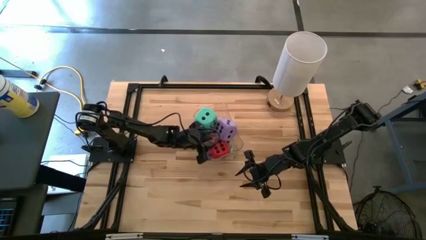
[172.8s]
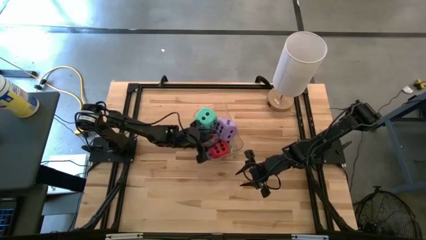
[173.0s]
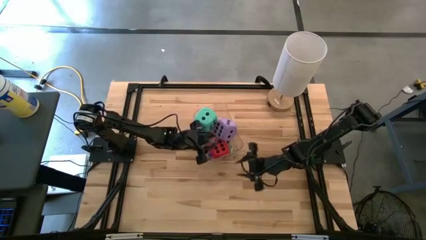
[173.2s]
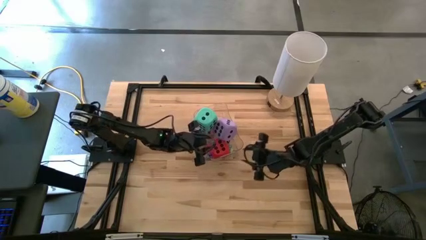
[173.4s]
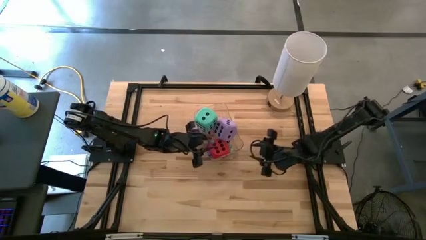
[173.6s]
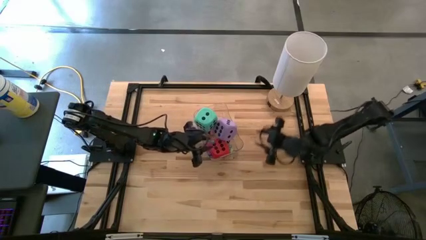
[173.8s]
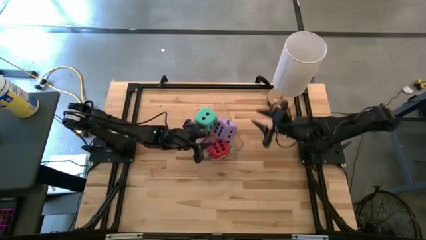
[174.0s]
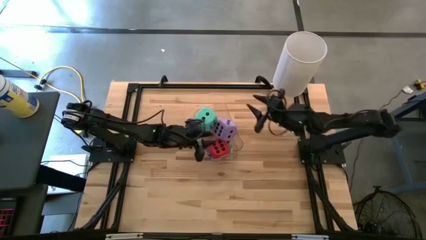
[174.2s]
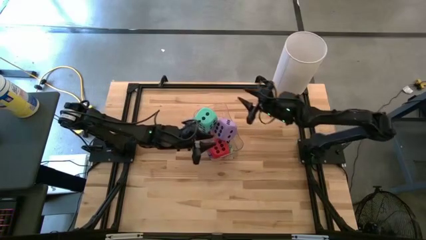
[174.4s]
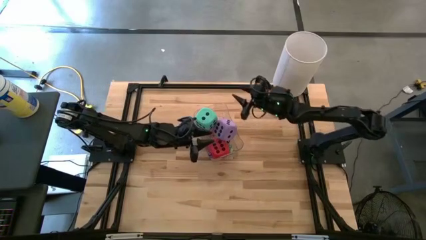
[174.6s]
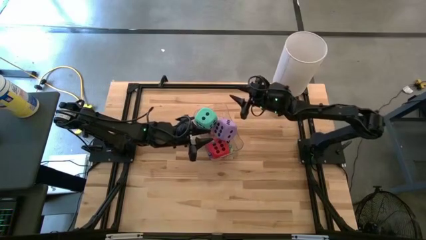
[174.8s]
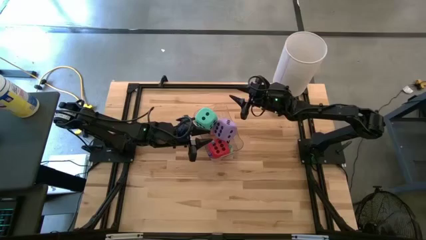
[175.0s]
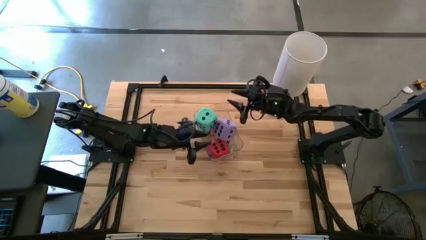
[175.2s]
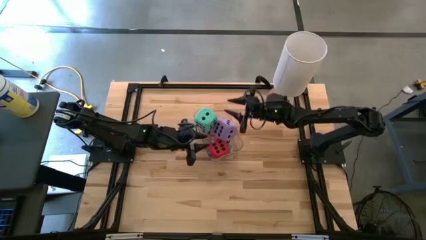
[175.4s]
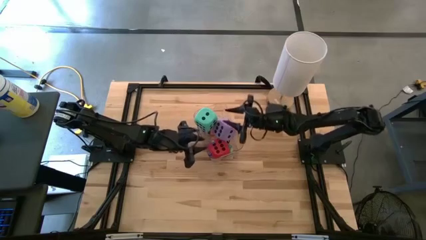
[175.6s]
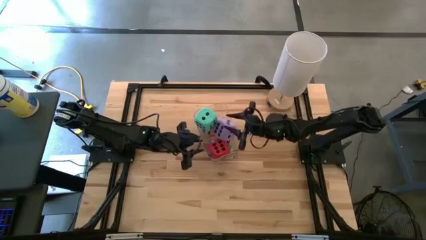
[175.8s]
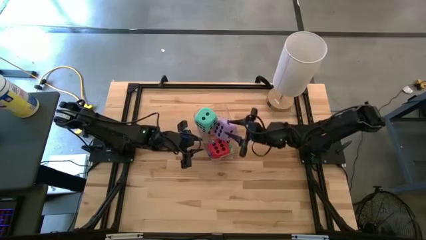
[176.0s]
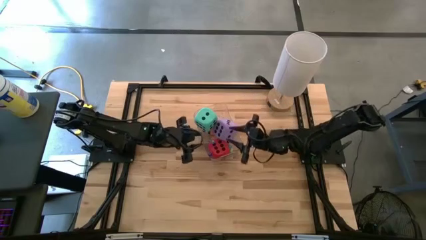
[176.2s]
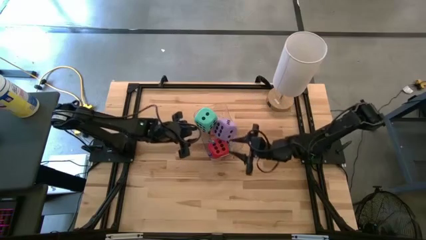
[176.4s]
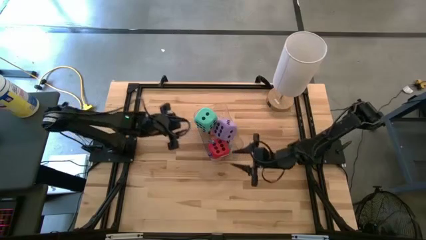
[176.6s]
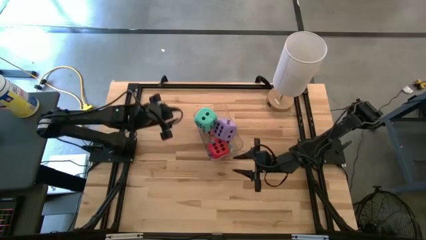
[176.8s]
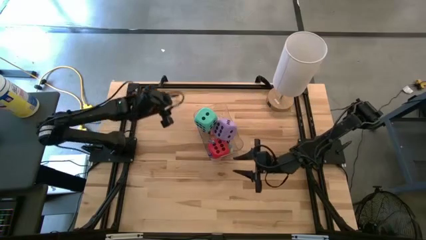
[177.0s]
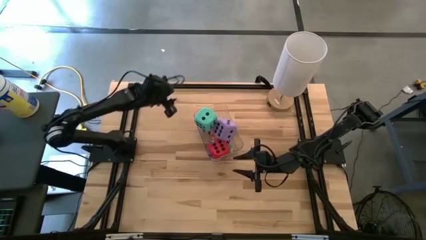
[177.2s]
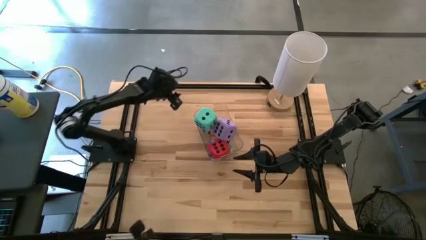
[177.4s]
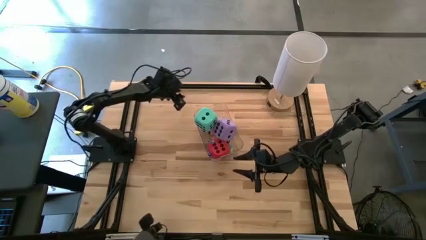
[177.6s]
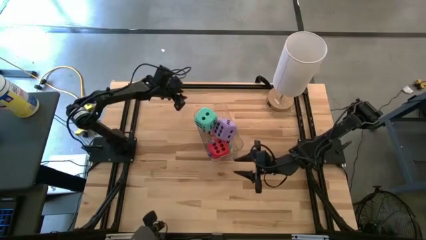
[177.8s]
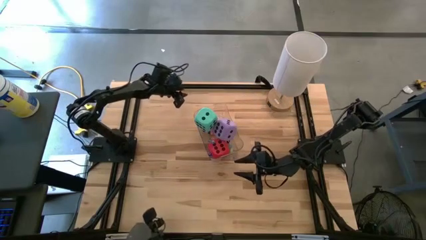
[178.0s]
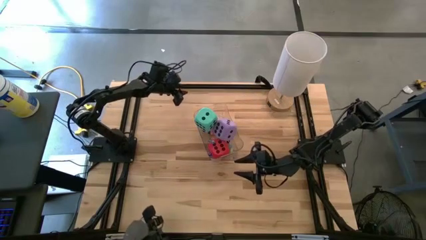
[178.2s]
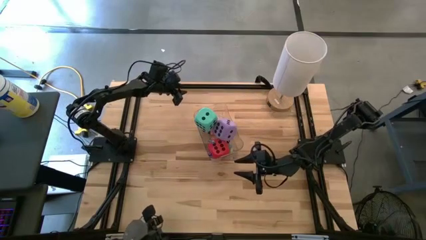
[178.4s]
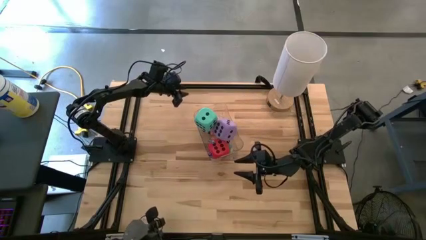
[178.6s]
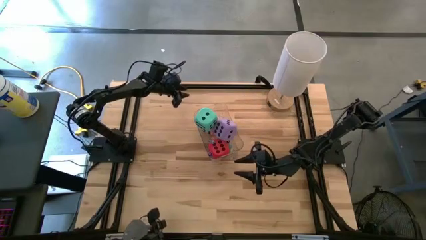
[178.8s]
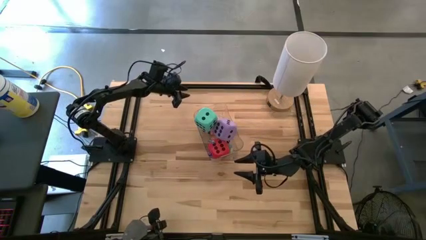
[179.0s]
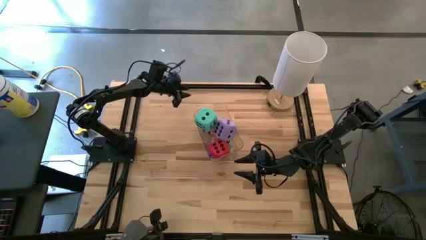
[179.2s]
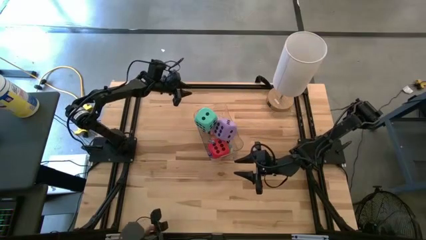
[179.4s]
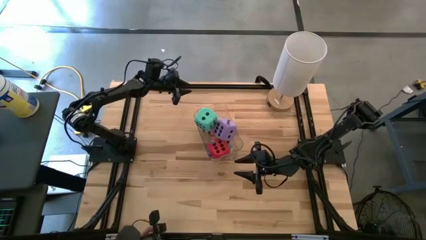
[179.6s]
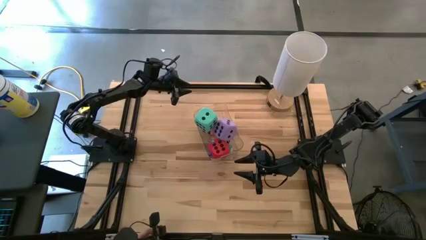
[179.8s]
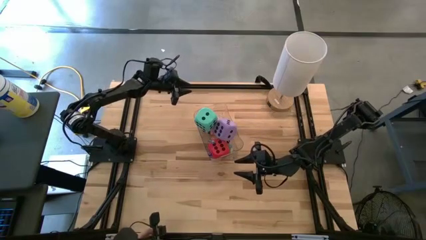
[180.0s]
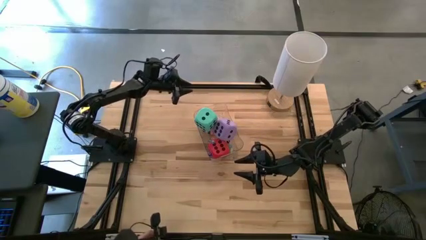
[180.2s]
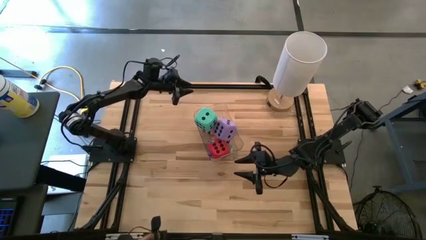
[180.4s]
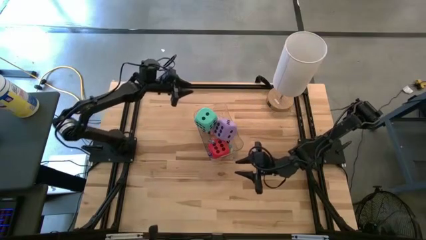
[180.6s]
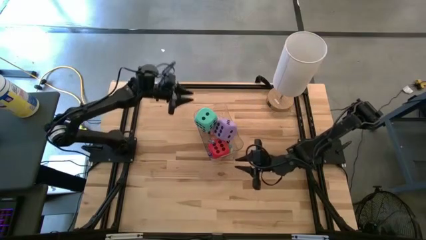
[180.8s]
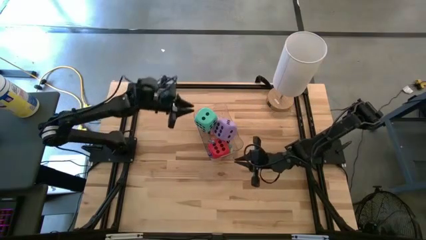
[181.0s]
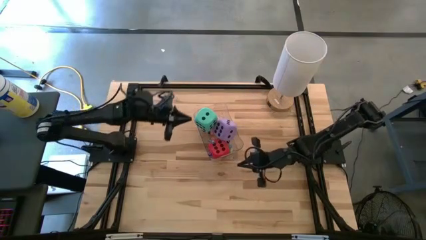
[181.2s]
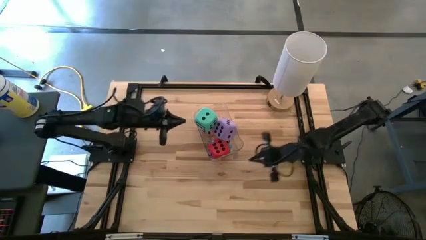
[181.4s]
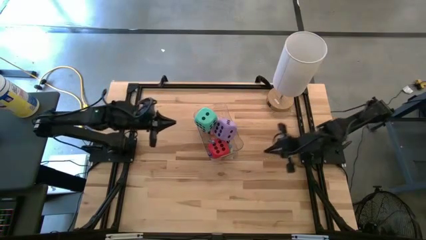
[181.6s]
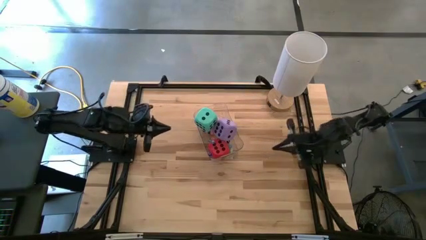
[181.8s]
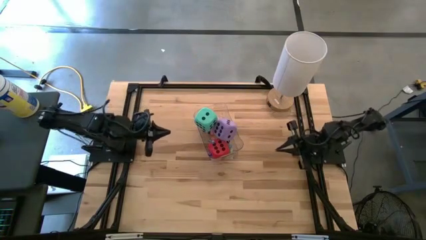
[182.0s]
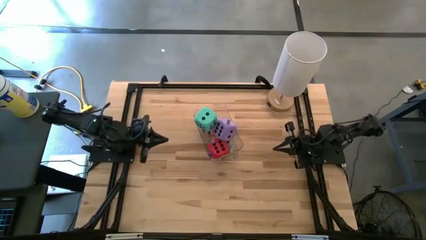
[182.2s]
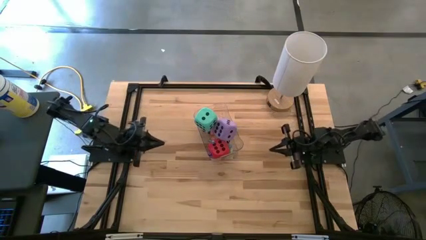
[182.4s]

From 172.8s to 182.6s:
Task: Pick & Place Dice
Return to Home Position

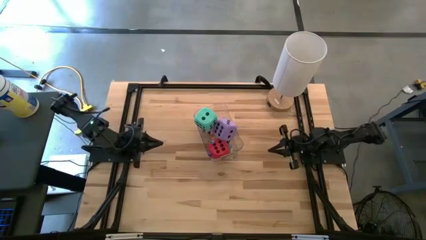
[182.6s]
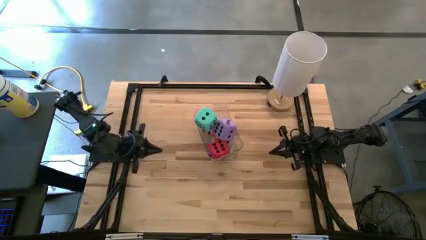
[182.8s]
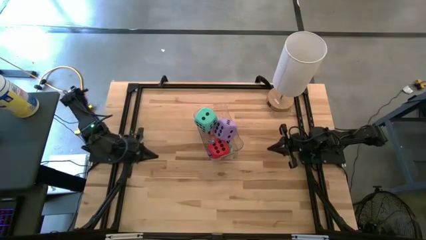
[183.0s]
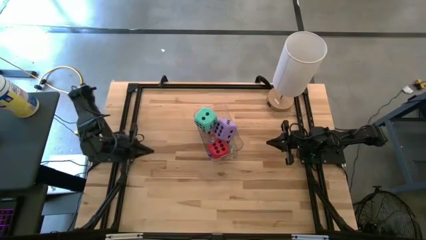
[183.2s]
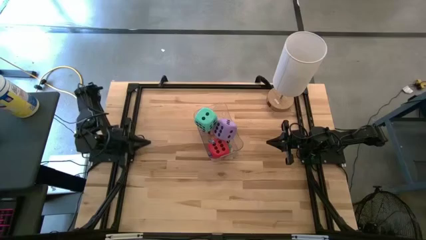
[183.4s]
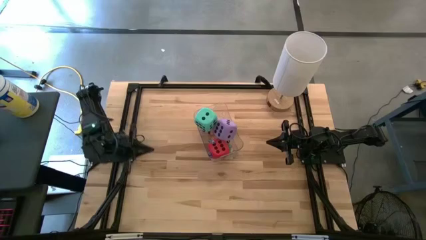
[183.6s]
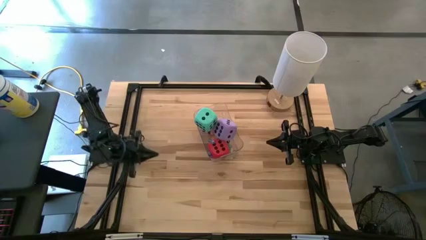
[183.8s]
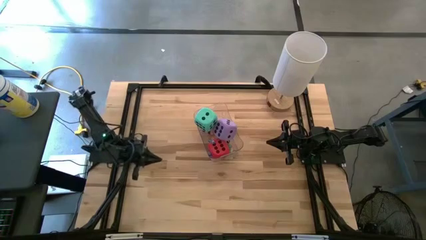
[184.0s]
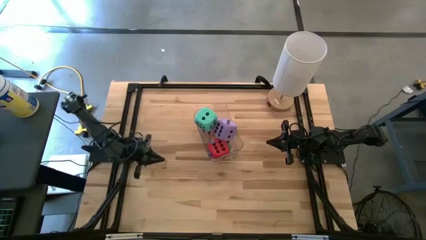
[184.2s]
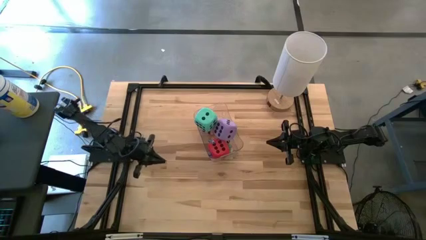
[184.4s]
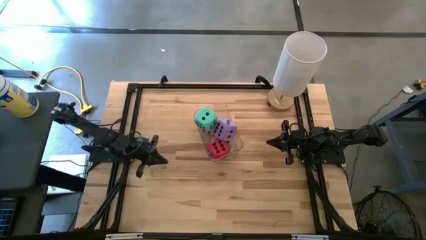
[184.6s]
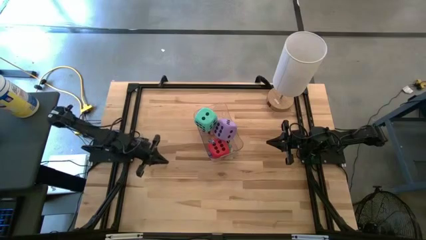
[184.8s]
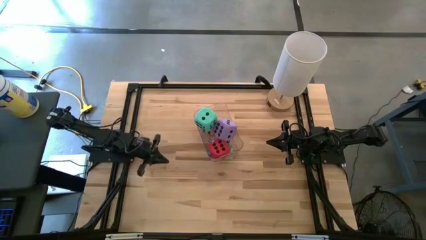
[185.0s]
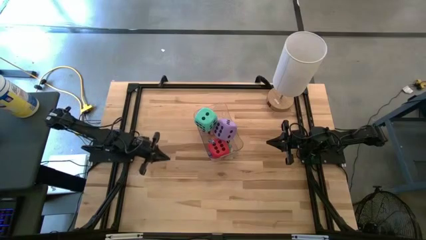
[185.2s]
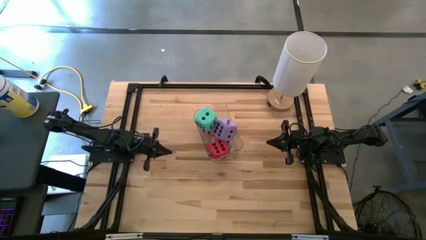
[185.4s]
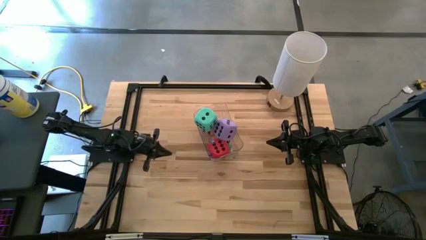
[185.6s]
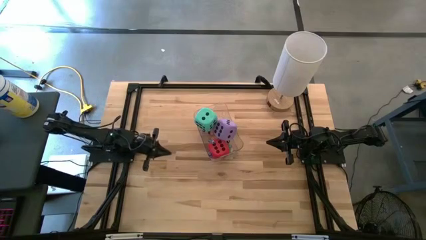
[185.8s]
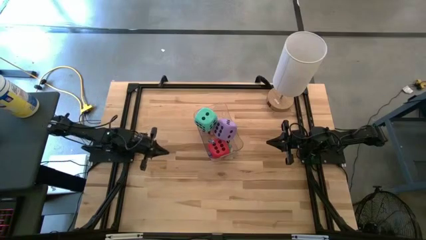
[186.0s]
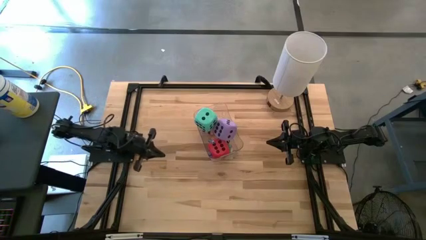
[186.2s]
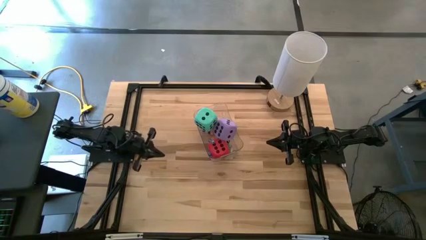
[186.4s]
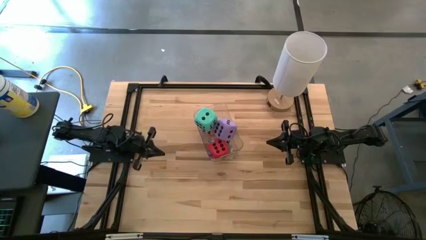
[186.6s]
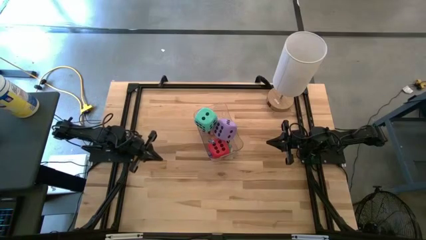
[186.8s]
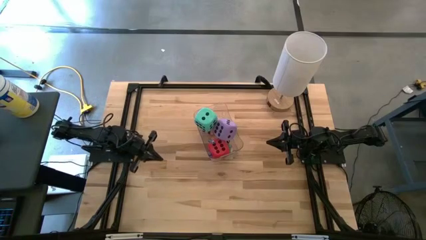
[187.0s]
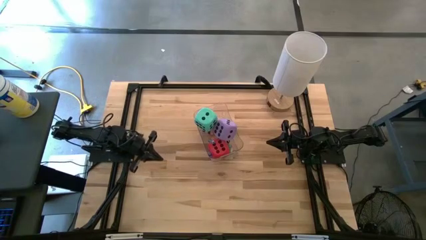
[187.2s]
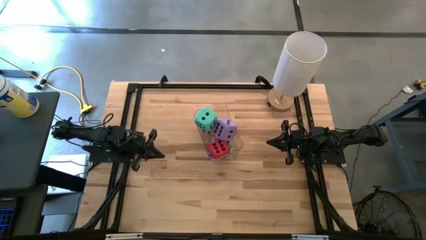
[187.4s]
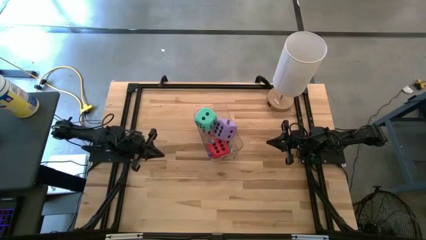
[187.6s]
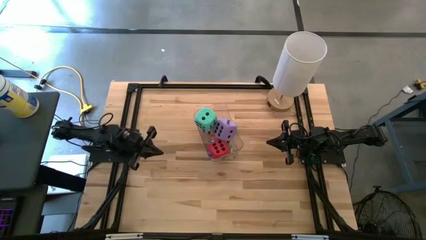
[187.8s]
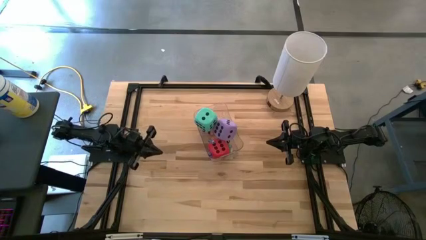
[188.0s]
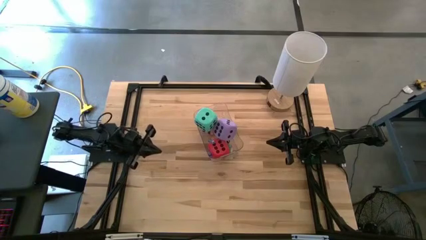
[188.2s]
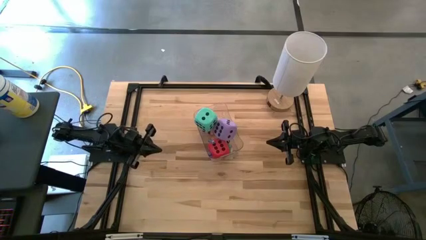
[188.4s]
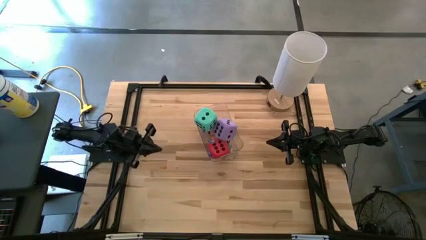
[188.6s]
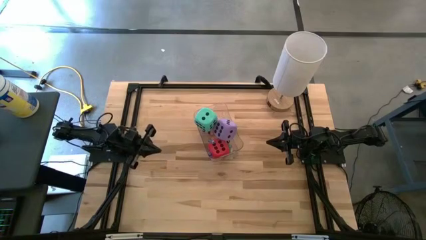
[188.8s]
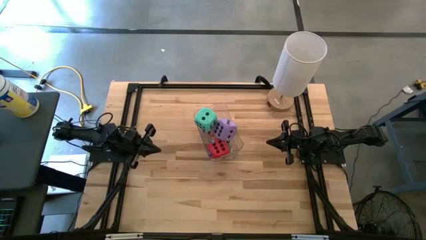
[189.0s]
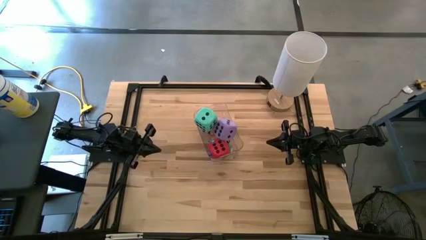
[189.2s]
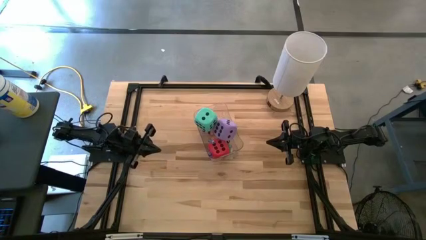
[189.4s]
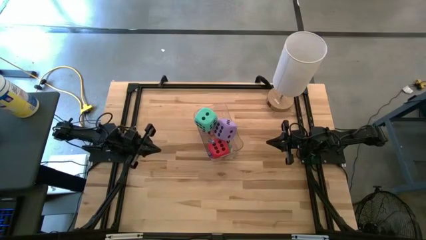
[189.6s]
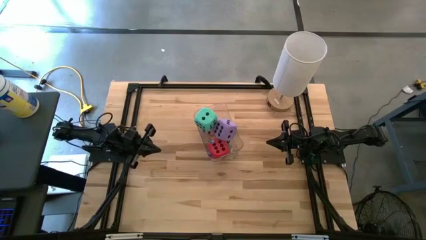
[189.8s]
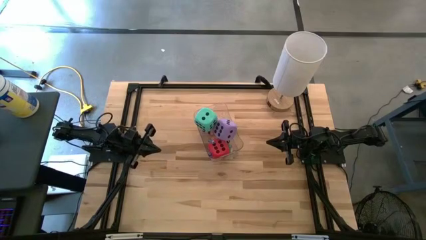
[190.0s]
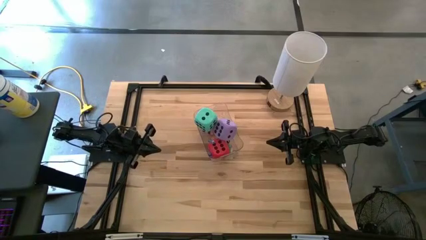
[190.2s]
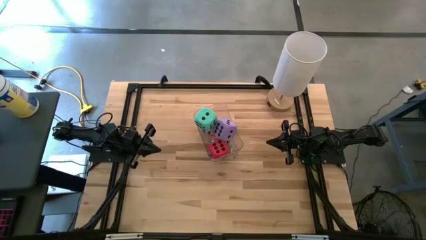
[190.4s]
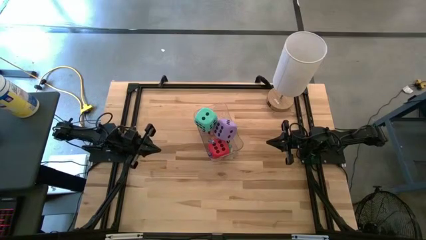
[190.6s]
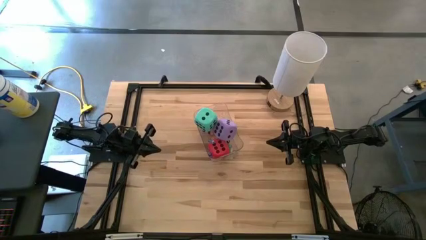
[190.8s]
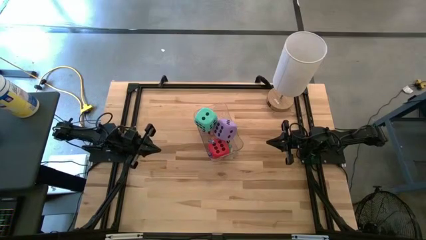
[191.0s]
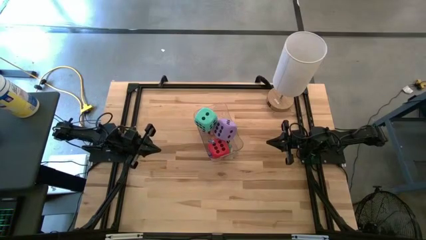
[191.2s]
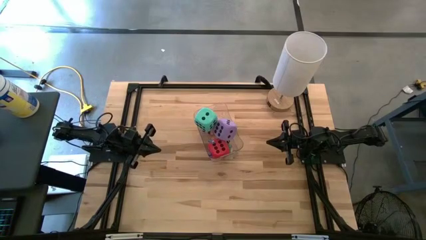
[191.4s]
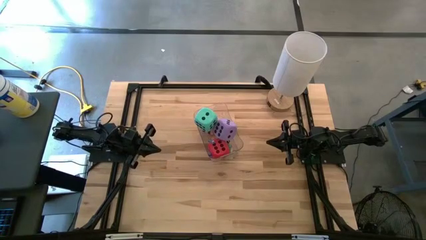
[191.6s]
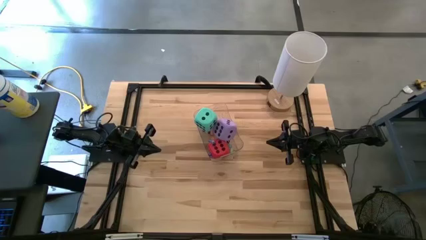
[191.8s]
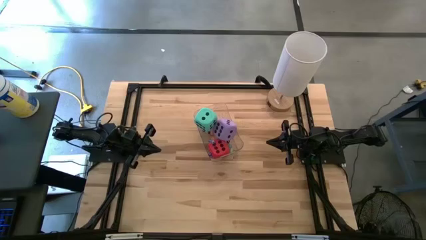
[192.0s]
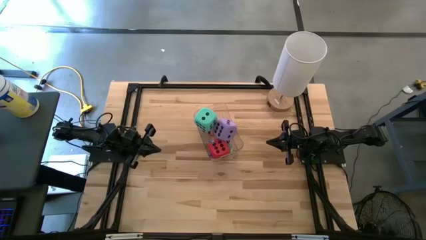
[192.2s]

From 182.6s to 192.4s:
Return to Home Position
